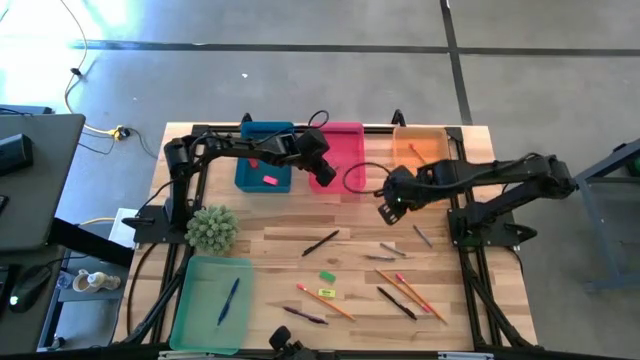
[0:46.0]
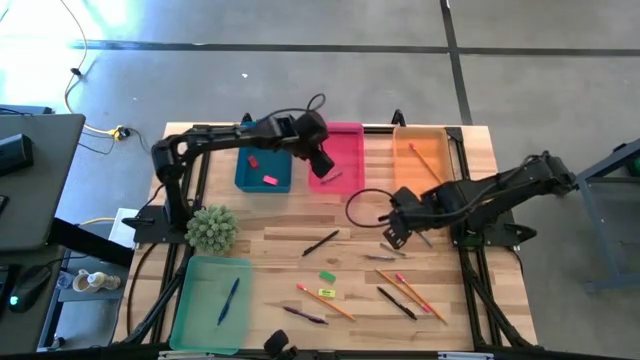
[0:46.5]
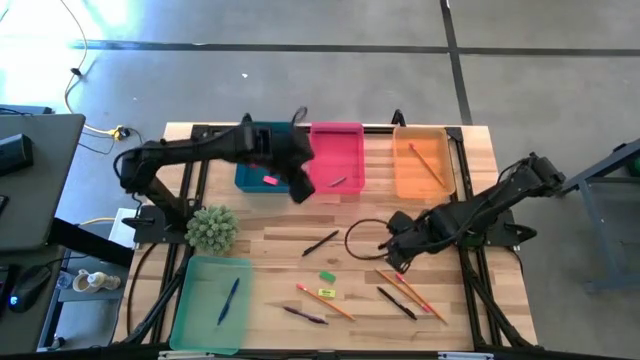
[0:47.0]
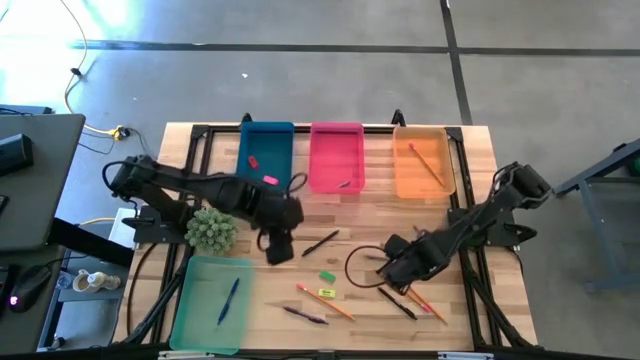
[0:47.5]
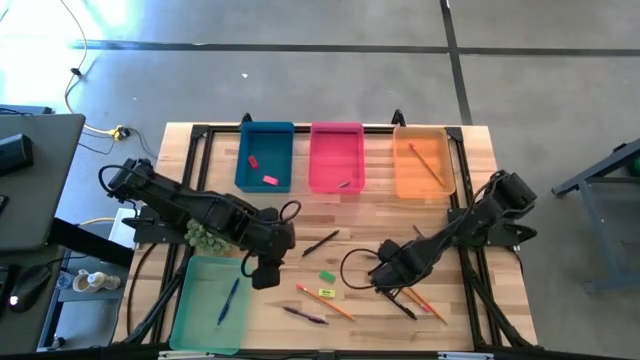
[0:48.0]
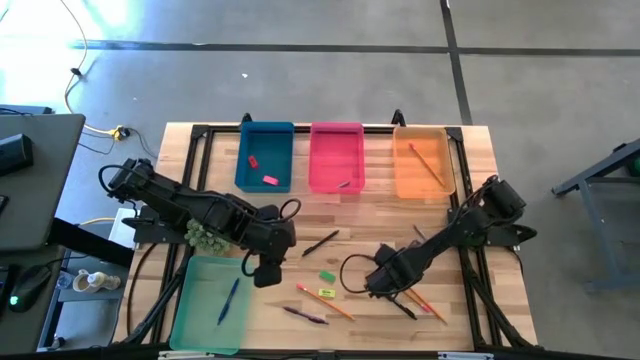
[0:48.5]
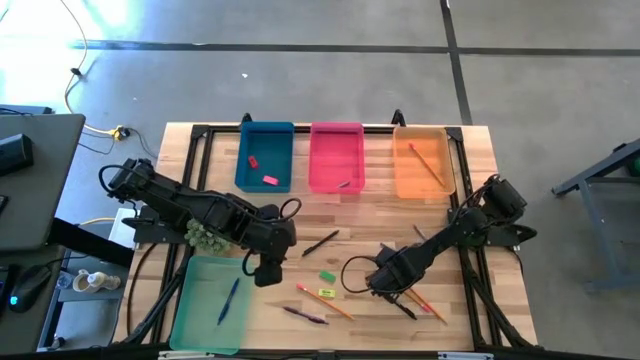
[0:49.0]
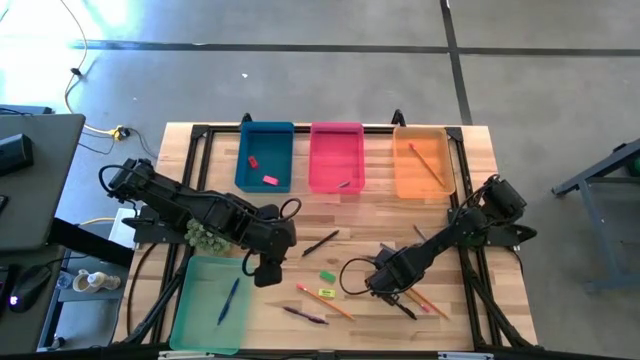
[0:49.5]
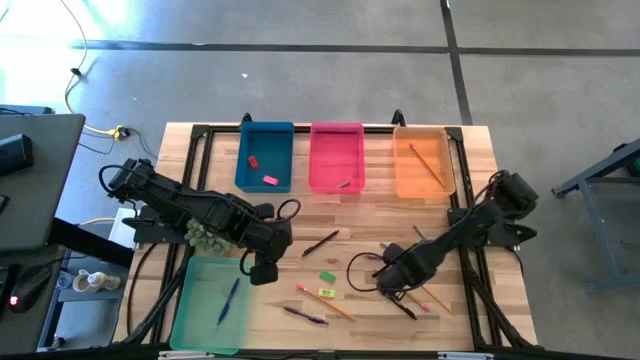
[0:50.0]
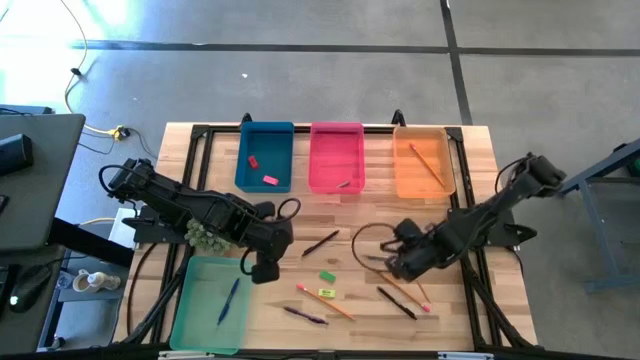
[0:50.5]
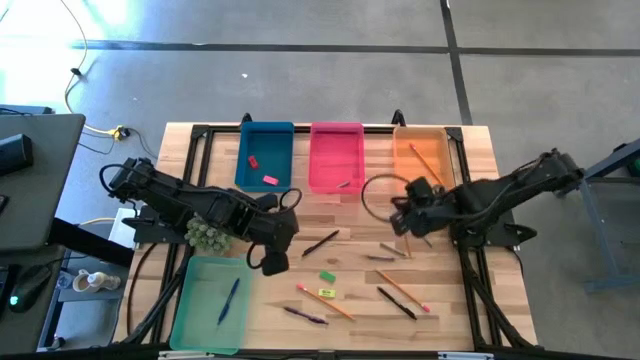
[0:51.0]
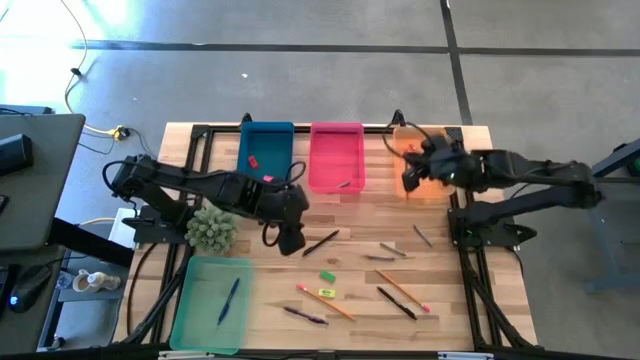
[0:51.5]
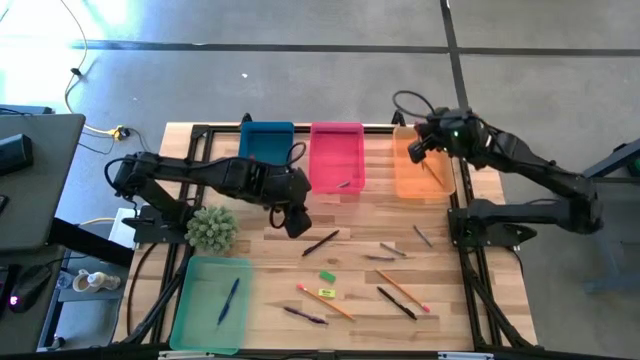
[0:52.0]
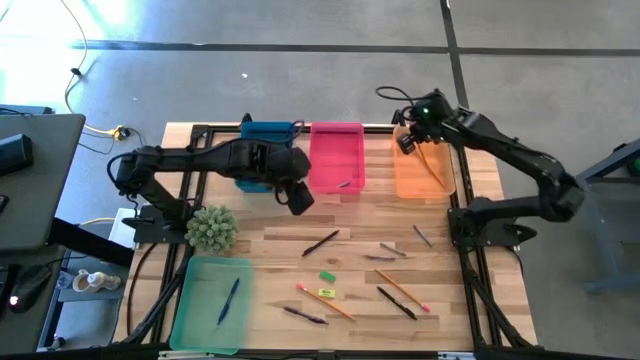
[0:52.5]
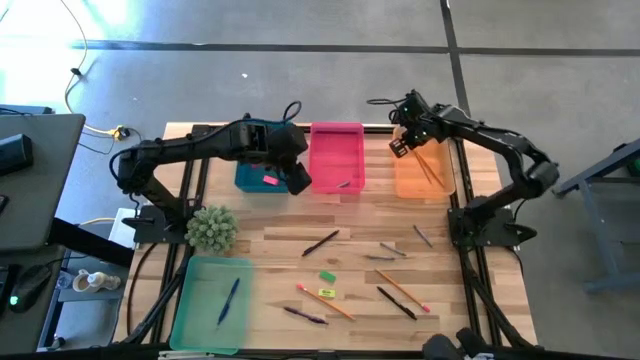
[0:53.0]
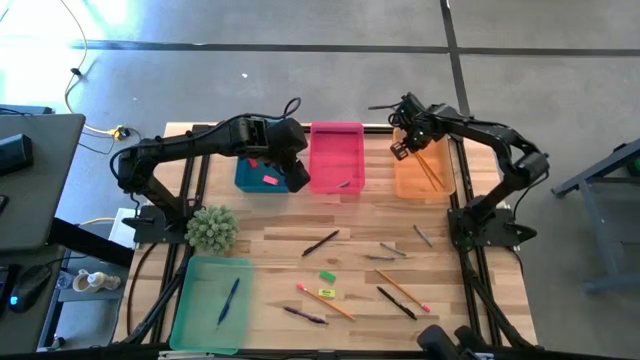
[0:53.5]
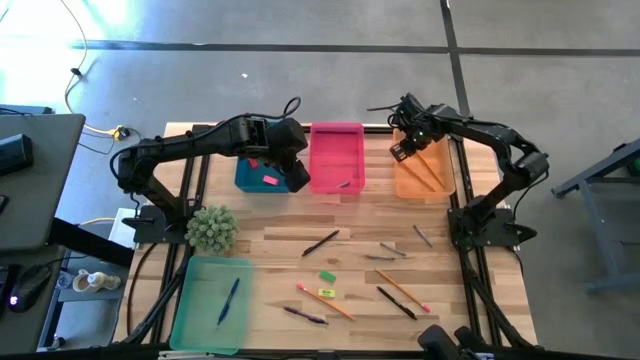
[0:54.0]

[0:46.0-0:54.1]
Task: Sort crayons/erasers/pens/pencils in bins
Put the right pencil into the orange bin

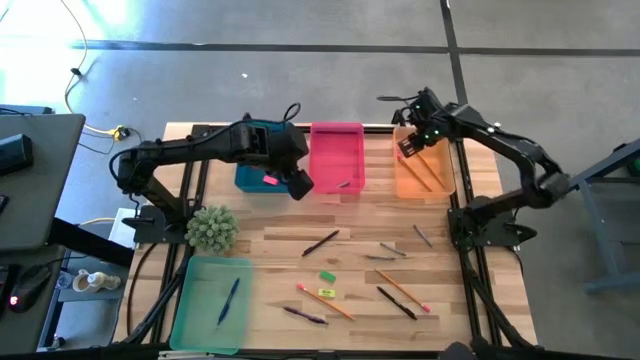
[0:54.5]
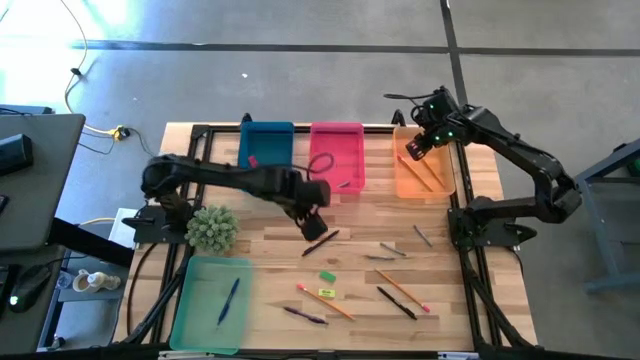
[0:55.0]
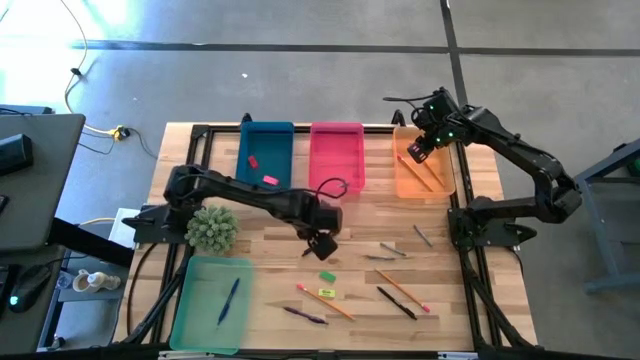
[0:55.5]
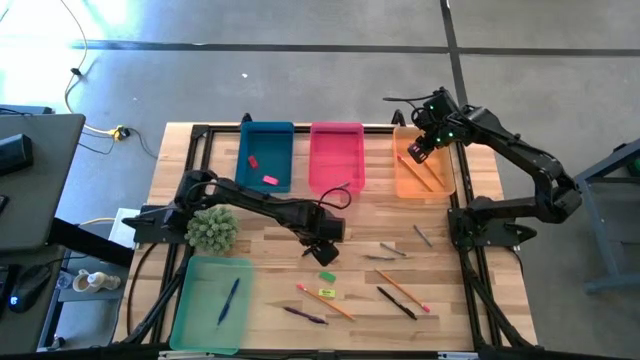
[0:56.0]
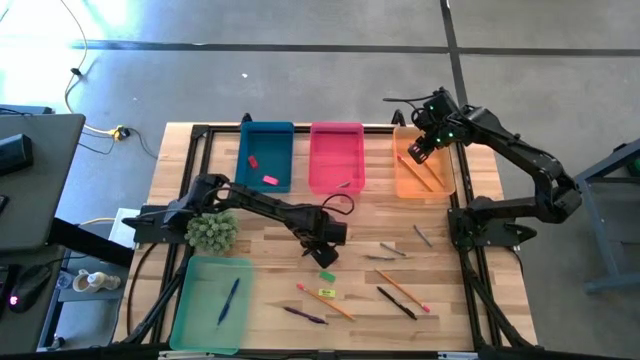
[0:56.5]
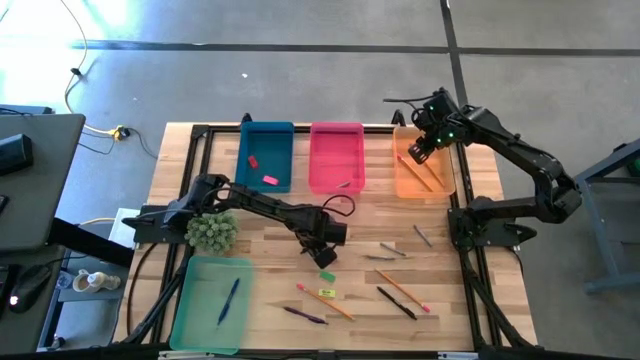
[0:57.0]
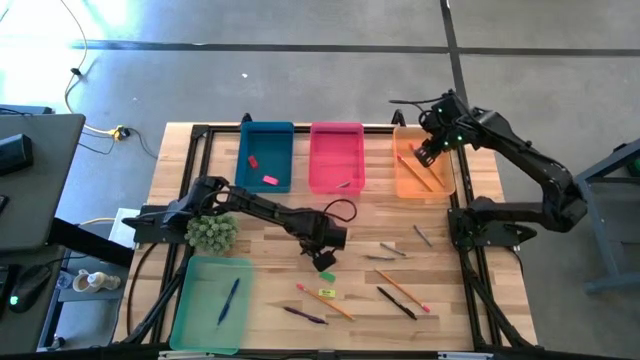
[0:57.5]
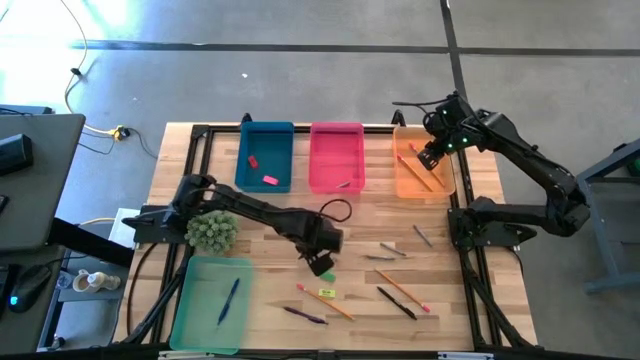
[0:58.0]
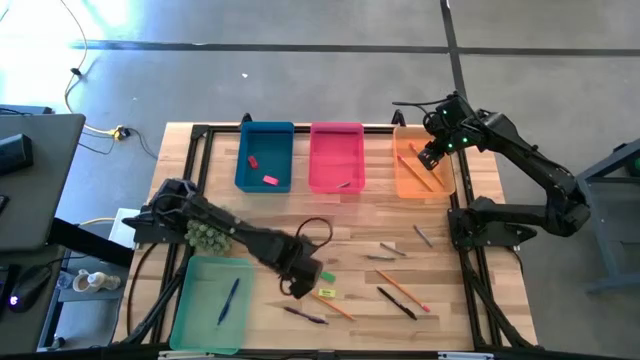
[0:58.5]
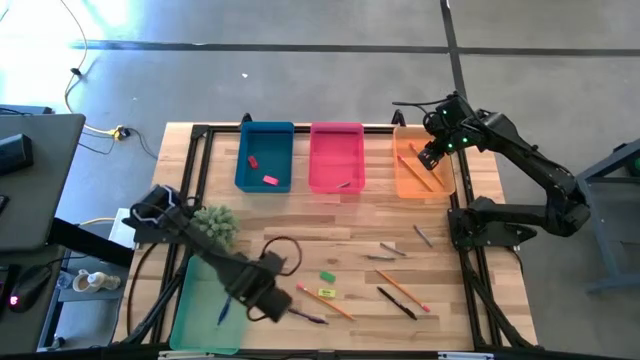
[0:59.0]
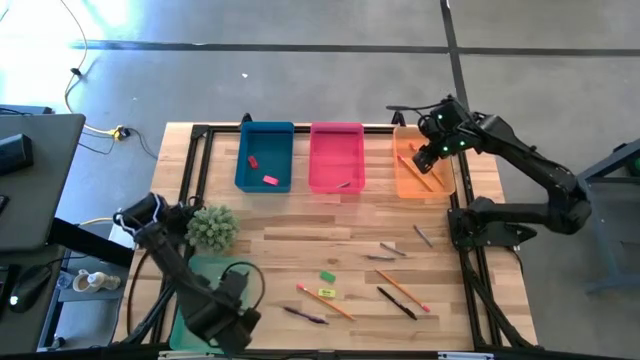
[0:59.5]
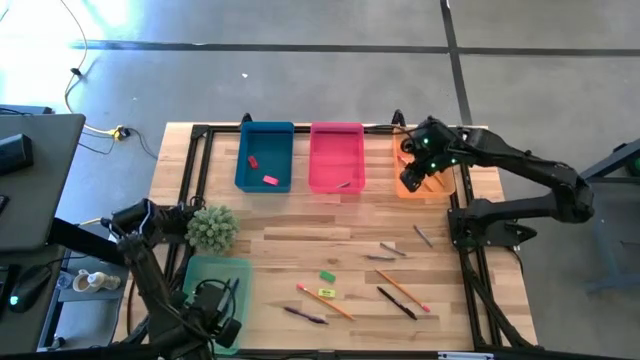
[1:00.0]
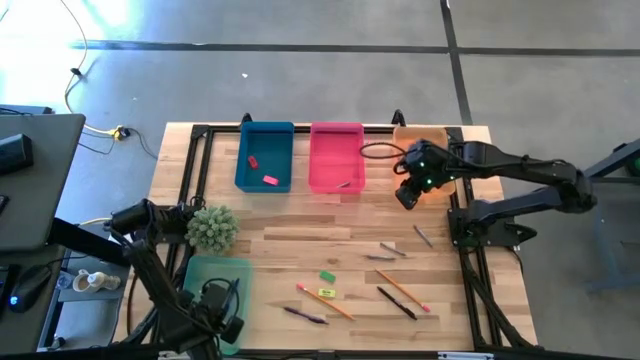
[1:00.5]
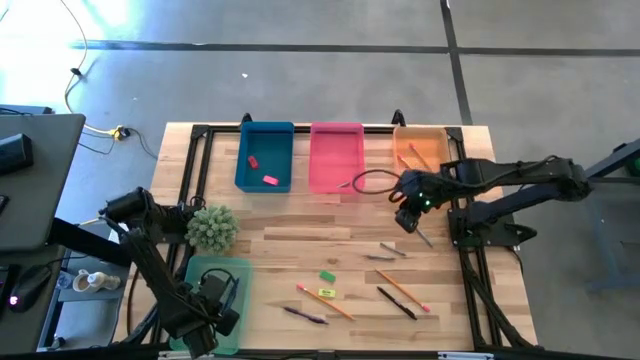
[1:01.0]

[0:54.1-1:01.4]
Put the top black pen into the blue bin

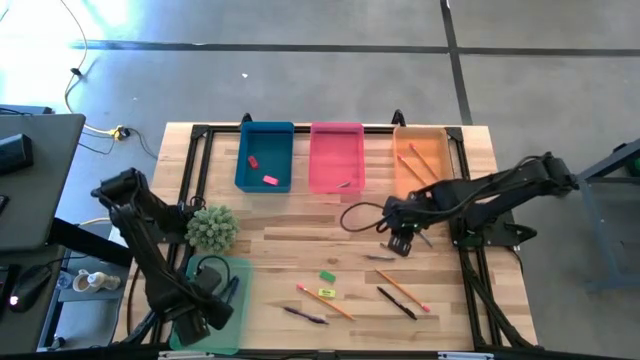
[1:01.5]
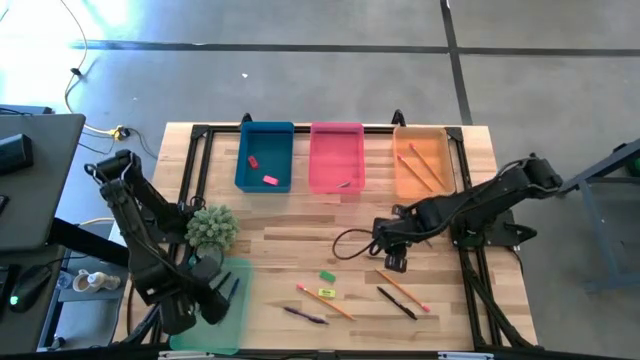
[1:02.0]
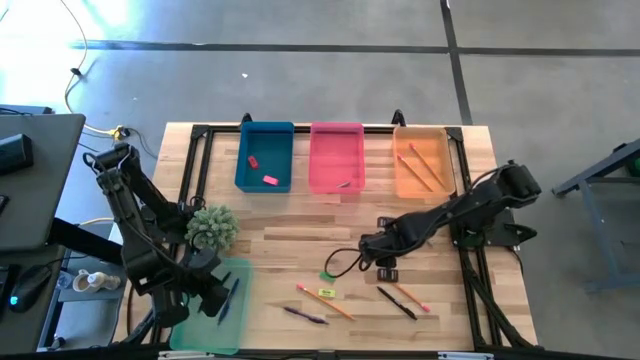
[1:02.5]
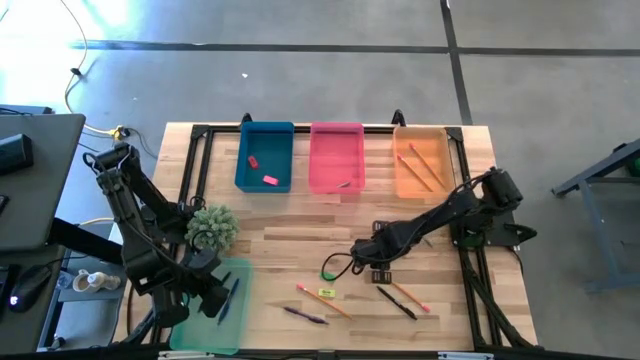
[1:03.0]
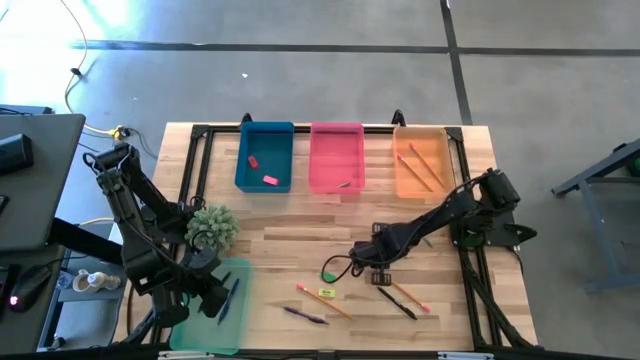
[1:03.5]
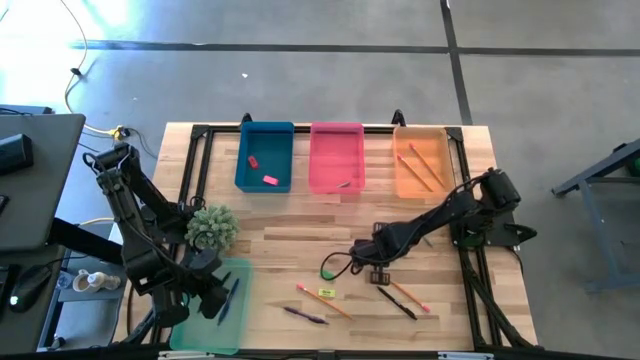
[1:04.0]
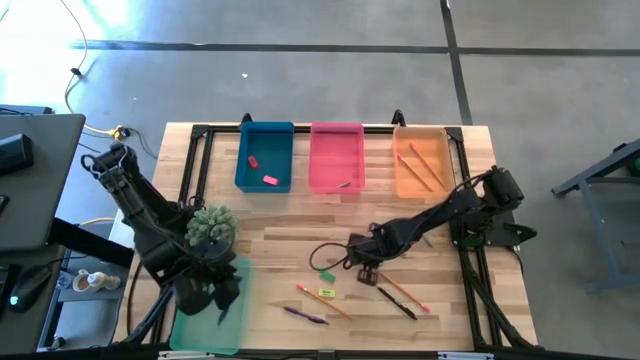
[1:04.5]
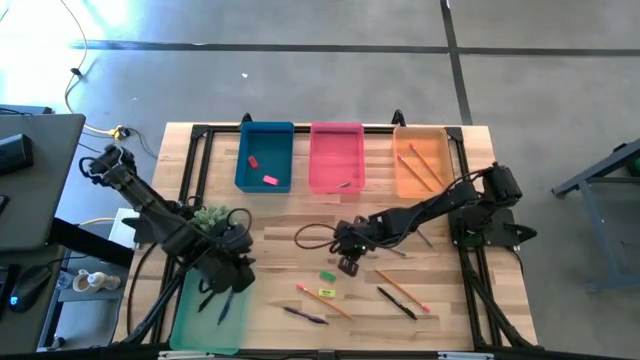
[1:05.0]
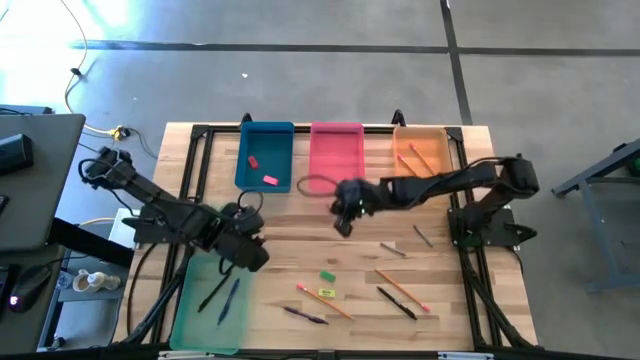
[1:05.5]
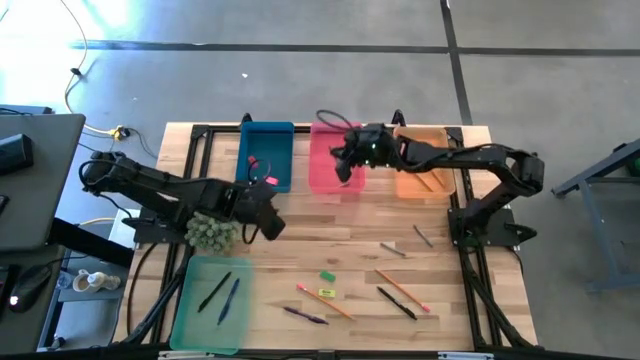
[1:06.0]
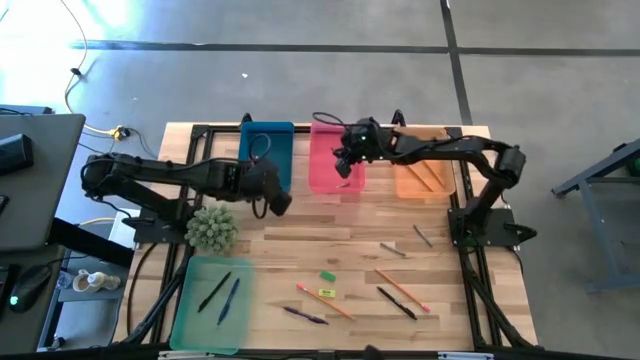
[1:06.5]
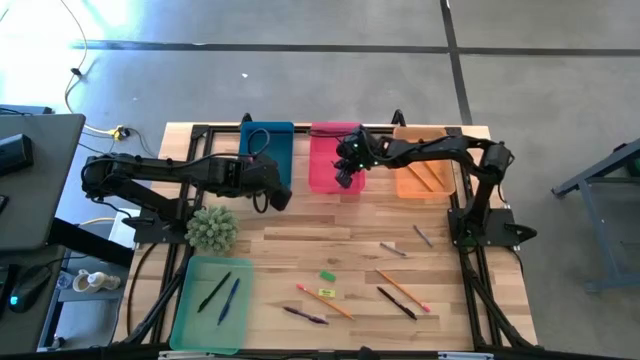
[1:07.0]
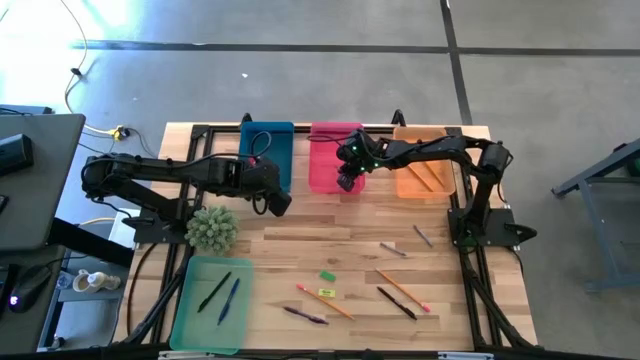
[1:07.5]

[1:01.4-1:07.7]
Put the bottom gray crayon into the pink bin
